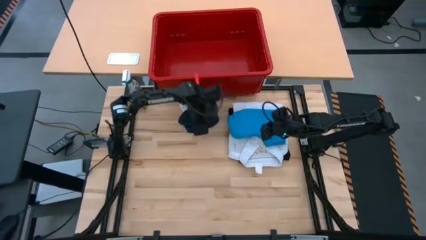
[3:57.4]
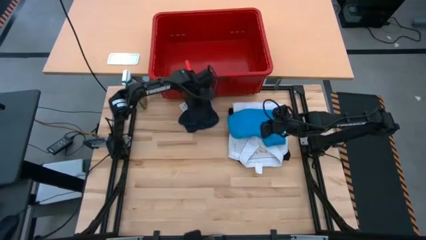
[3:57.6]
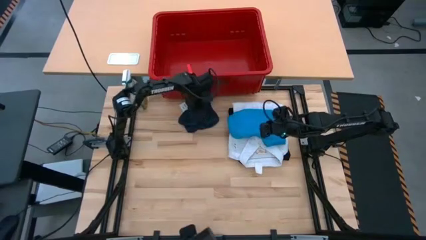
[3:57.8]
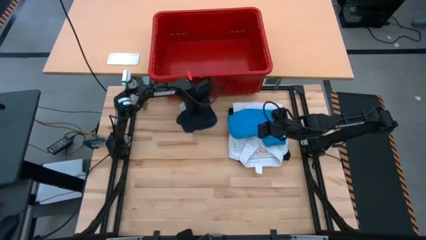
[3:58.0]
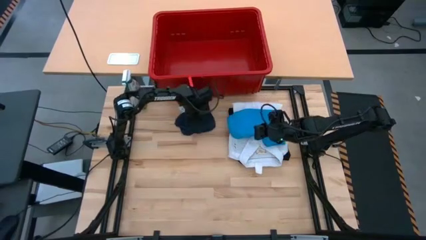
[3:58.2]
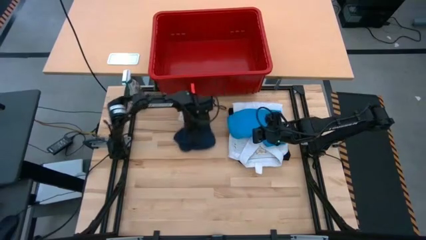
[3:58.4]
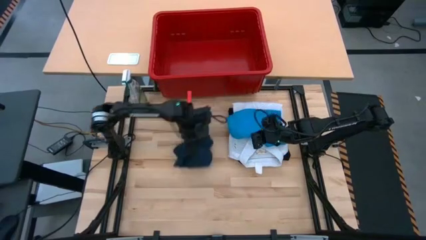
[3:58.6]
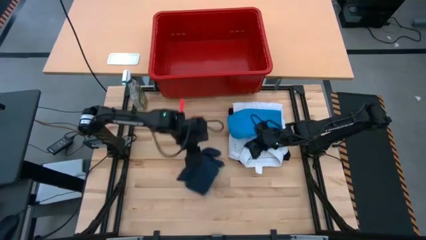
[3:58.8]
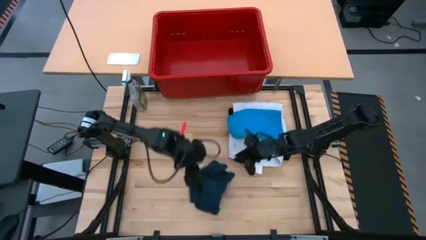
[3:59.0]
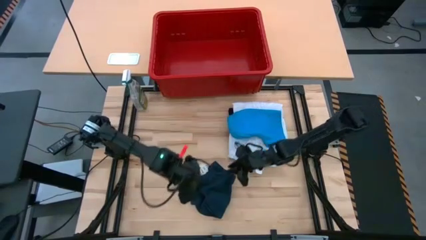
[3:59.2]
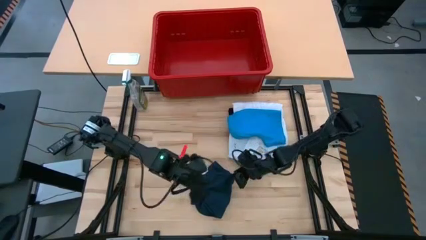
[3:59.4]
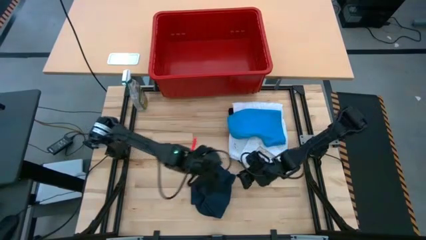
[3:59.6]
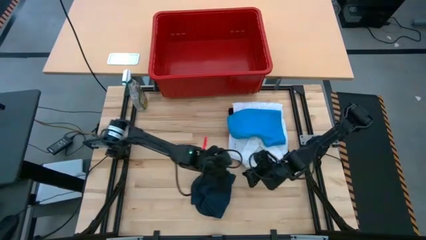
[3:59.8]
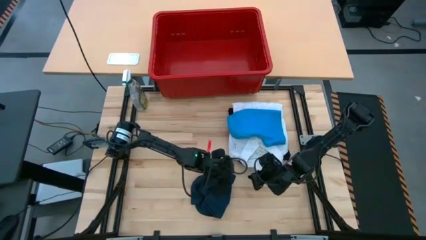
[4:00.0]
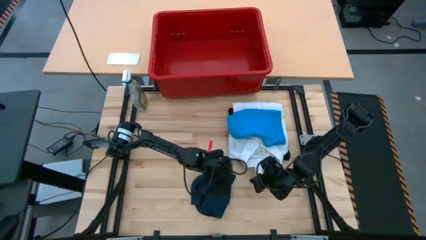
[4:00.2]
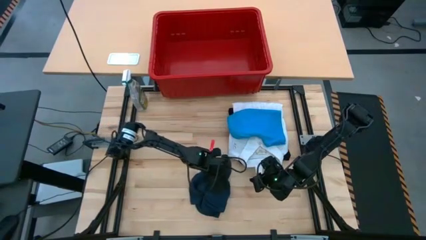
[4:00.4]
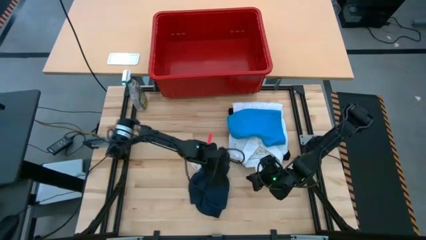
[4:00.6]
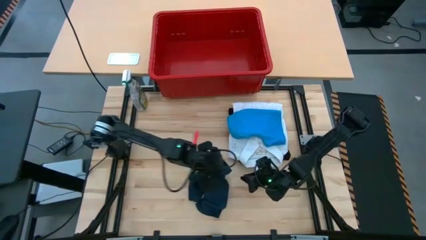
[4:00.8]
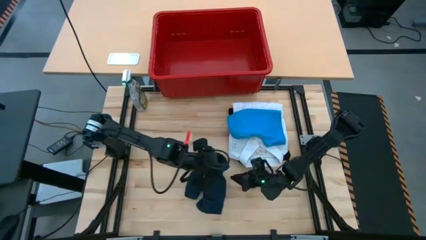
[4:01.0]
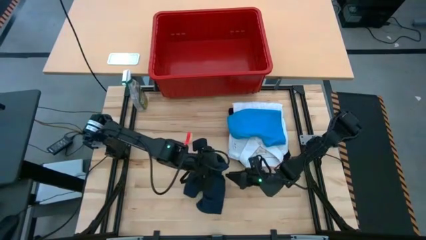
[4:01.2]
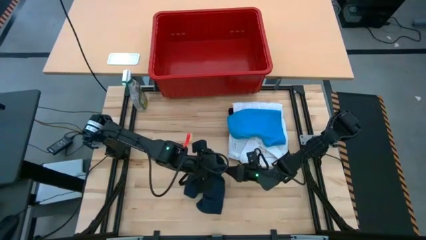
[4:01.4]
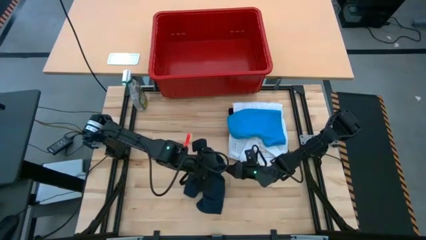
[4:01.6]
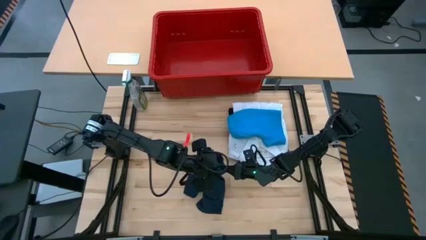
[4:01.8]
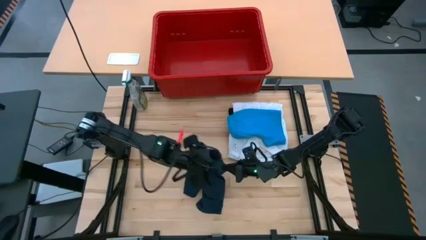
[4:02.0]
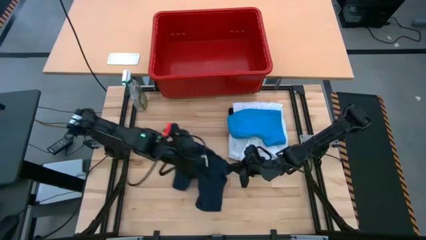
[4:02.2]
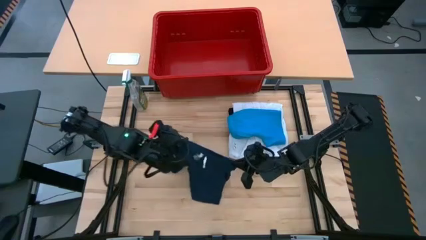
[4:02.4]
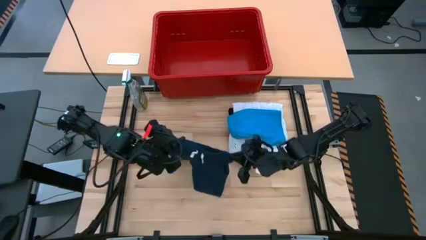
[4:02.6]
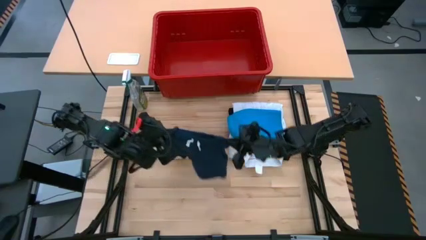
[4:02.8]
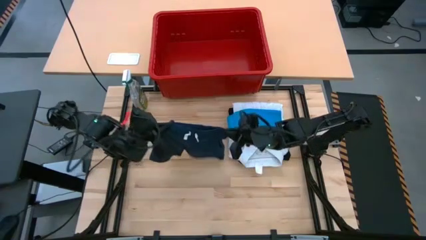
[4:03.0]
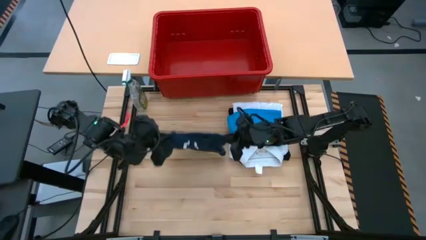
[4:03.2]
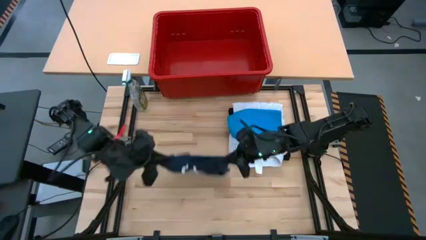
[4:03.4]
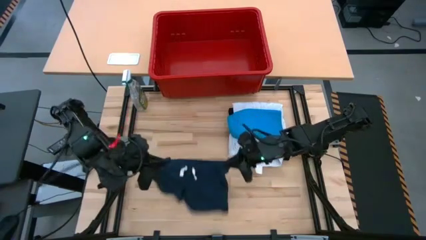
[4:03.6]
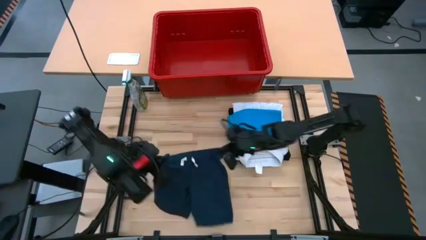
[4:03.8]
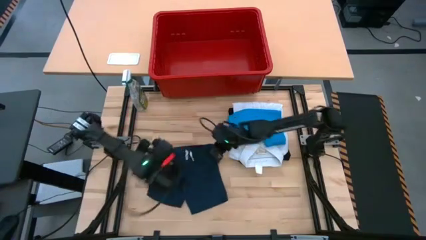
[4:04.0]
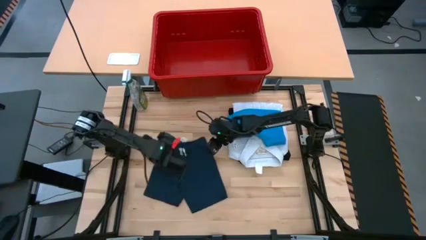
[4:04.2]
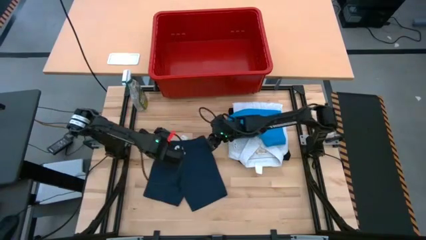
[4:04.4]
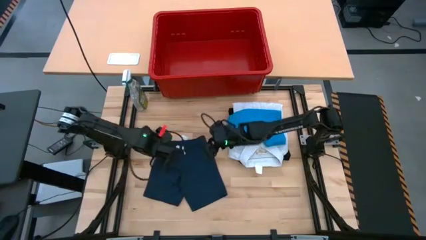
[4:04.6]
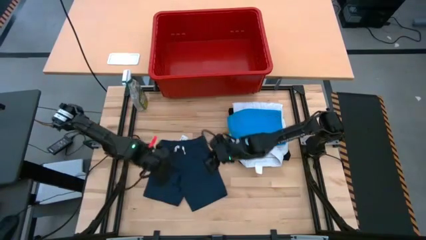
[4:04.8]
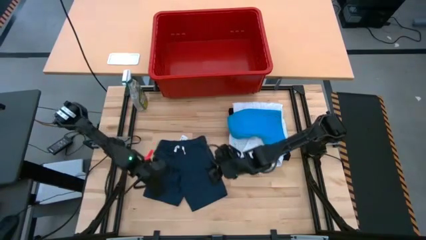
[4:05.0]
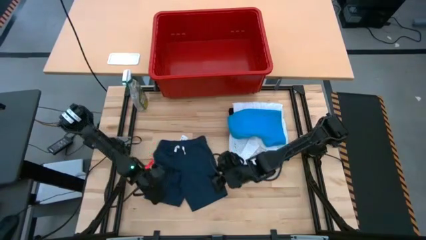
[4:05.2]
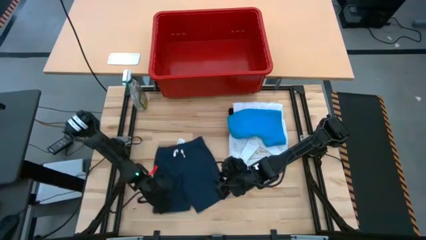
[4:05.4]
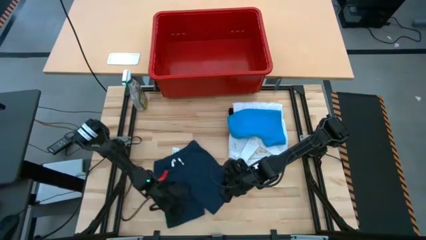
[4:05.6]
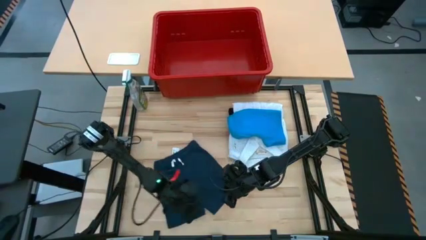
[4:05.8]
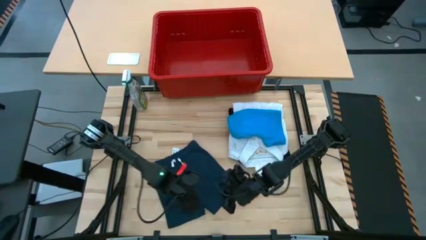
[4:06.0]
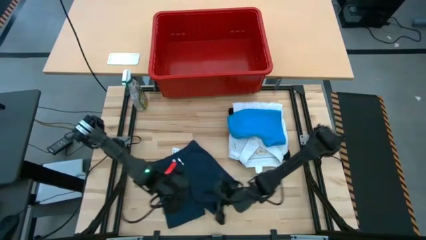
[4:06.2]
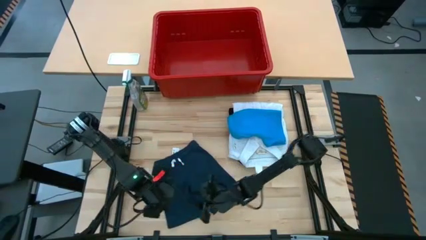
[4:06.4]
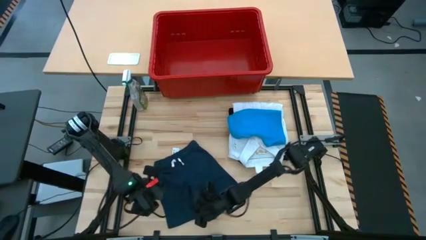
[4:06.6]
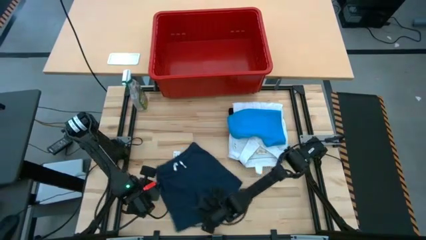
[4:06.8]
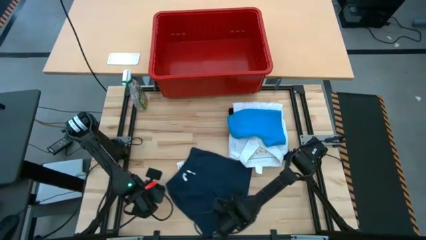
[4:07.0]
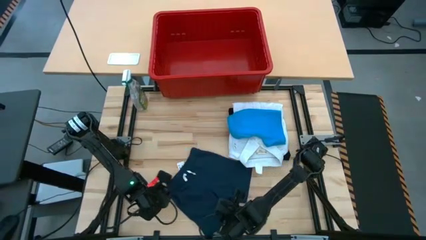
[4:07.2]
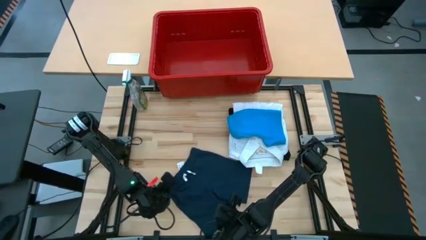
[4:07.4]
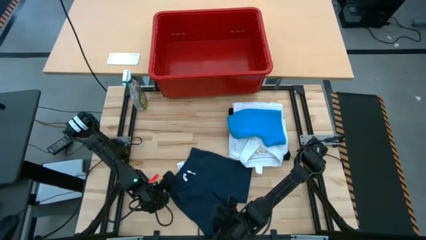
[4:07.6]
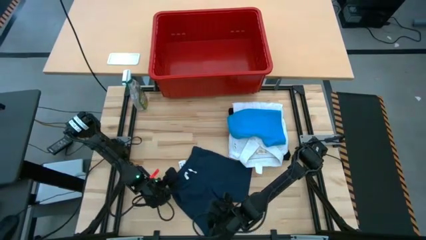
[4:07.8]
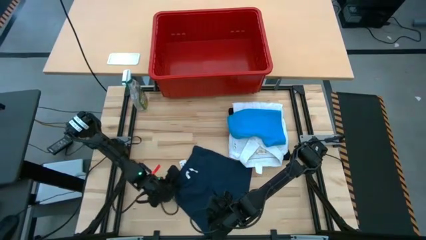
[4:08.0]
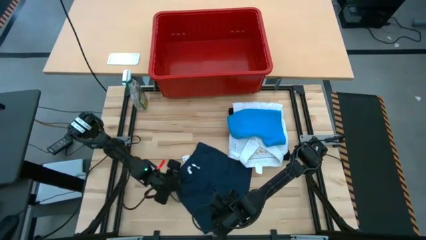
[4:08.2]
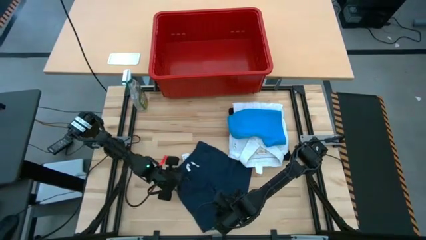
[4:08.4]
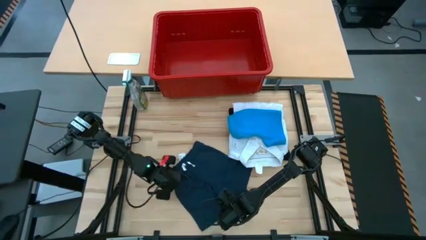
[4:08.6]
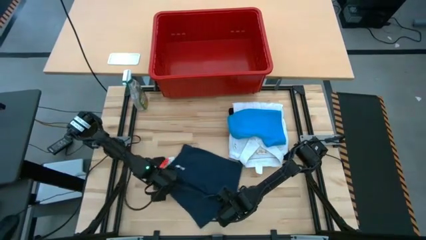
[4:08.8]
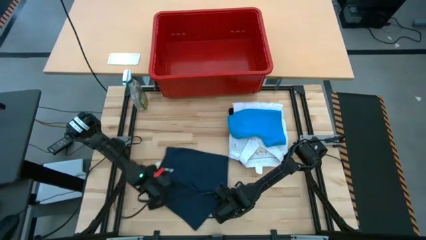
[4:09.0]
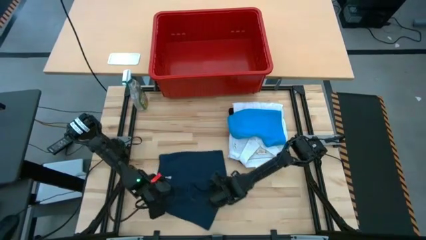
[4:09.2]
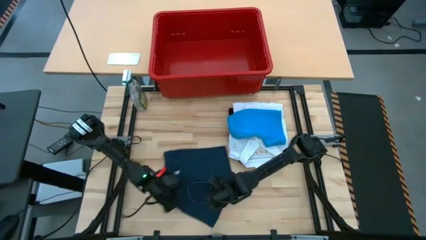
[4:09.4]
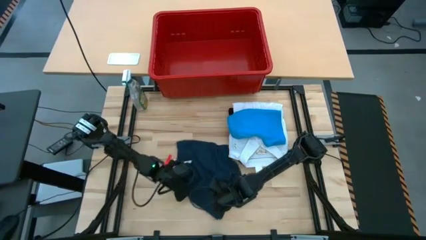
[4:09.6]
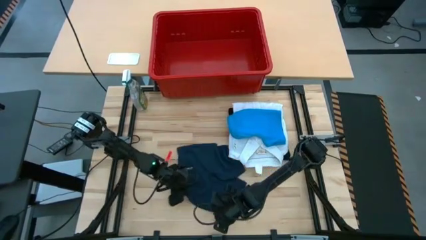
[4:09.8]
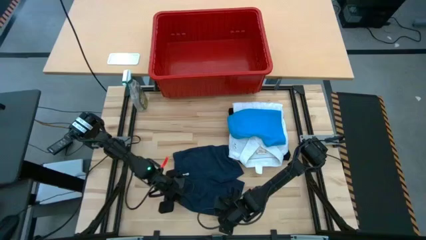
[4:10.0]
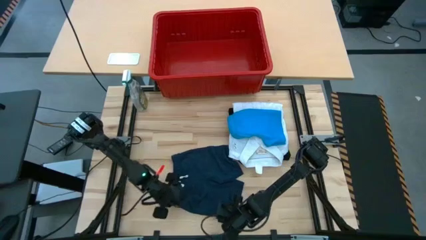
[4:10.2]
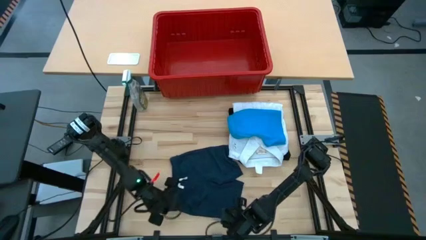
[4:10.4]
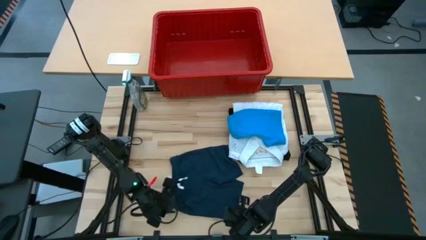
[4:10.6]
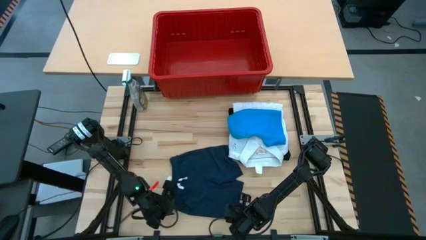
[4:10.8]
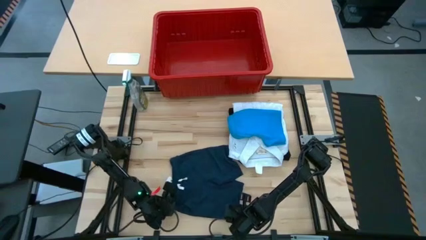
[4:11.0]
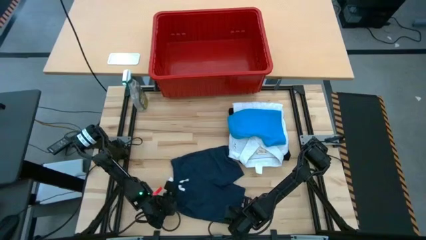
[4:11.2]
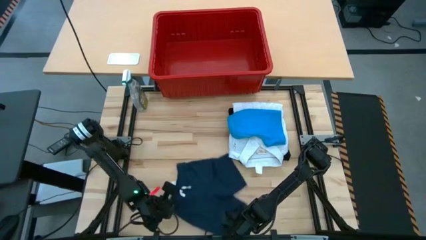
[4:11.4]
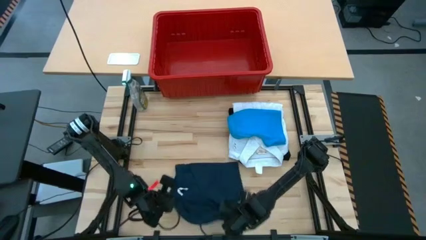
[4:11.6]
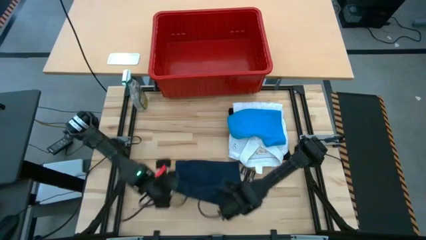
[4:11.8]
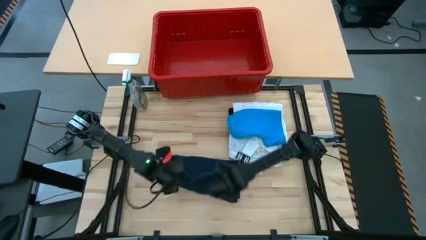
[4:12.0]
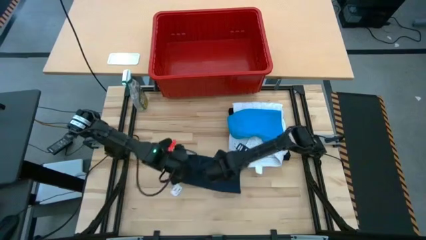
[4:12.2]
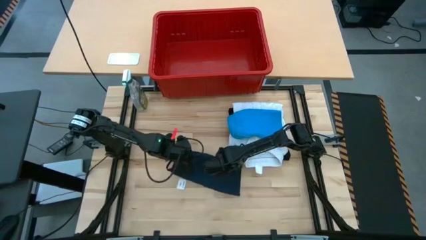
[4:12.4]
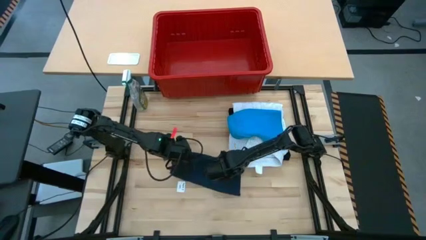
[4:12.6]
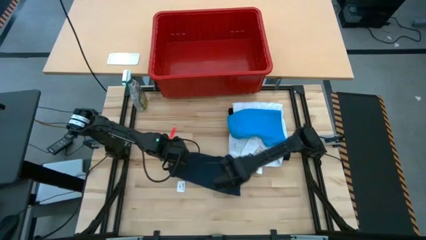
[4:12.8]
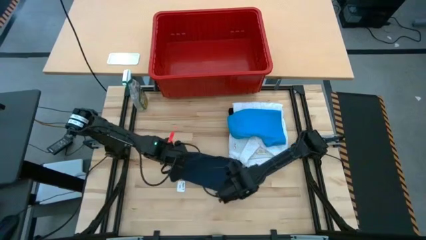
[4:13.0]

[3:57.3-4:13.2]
Task: Fold laundry
Fold the dark blue shorts

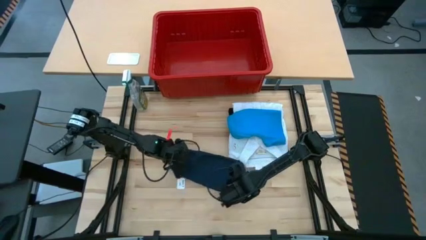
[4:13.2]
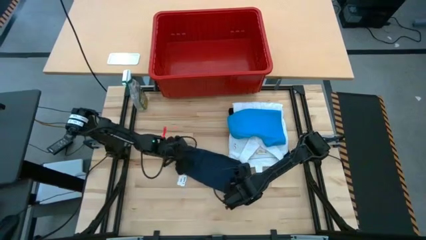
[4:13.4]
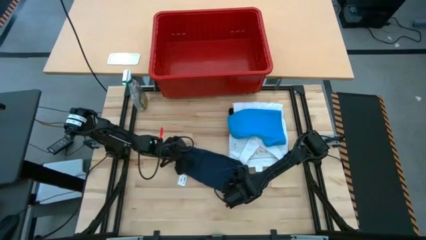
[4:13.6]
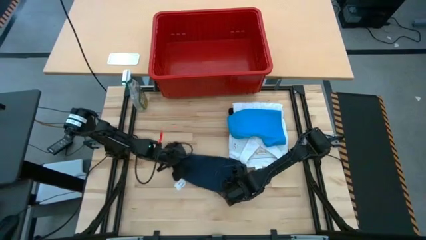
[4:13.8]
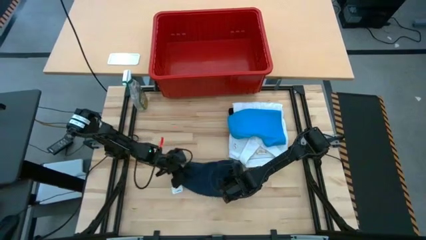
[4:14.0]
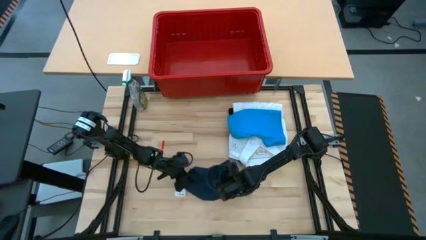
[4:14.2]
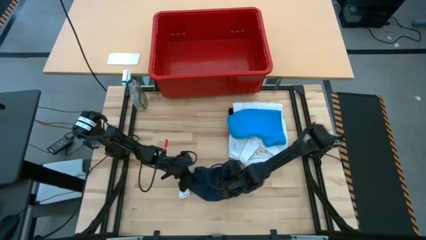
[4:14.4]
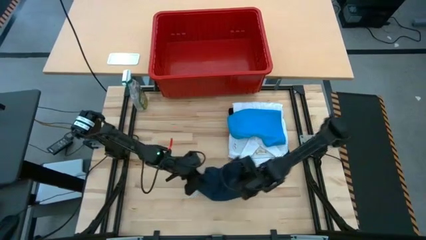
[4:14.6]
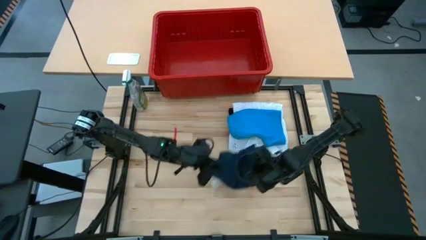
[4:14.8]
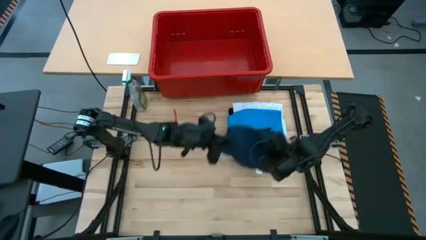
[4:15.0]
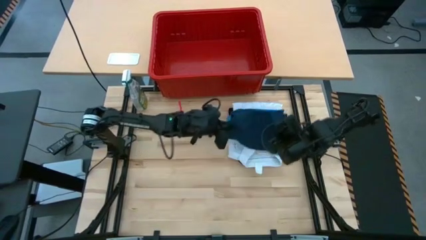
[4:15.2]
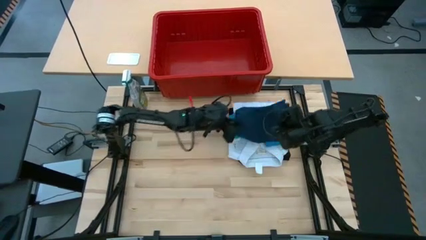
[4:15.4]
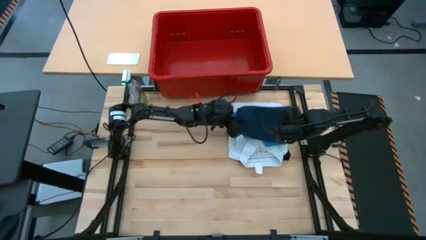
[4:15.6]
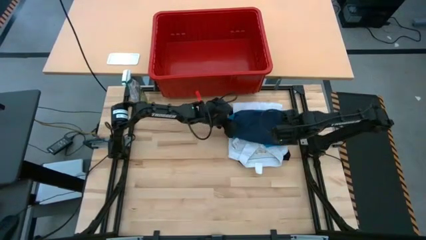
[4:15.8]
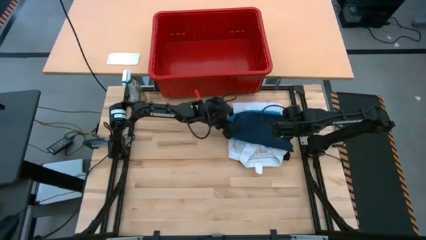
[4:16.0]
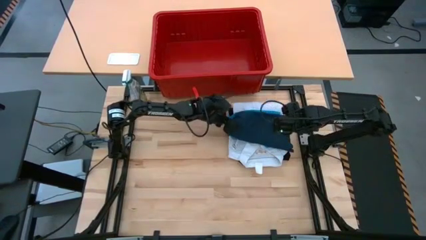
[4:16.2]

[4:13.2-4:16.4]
Stack the dark blue shorts on top of the blue shorts
